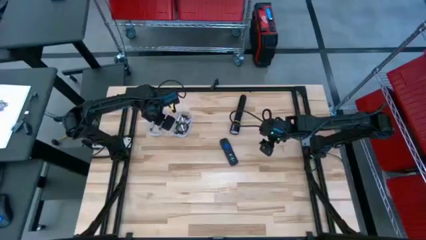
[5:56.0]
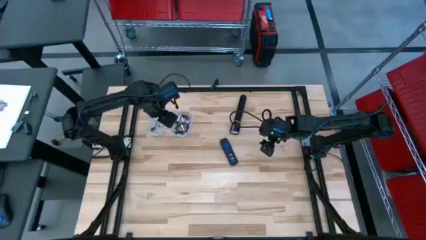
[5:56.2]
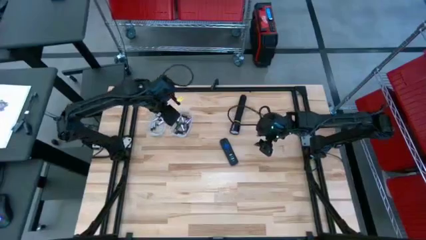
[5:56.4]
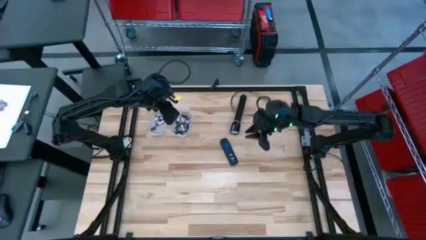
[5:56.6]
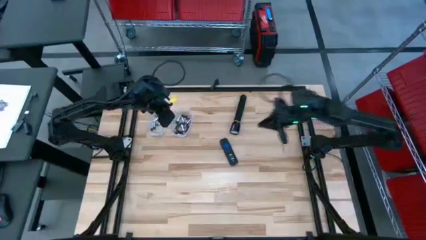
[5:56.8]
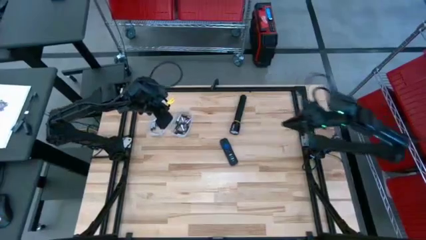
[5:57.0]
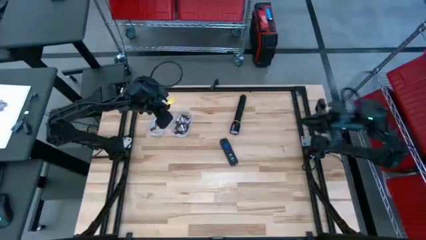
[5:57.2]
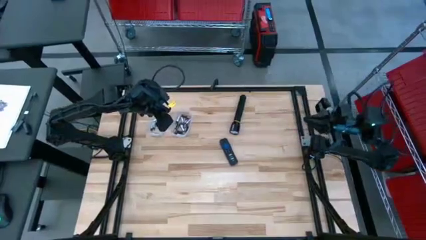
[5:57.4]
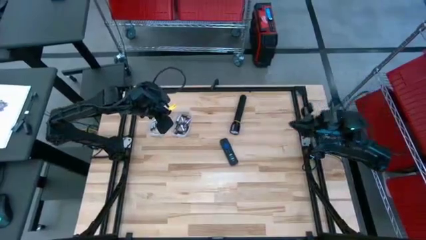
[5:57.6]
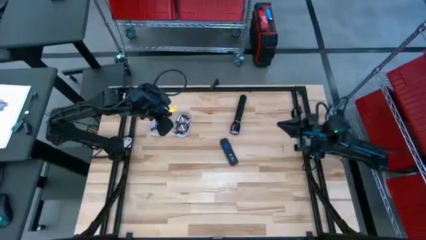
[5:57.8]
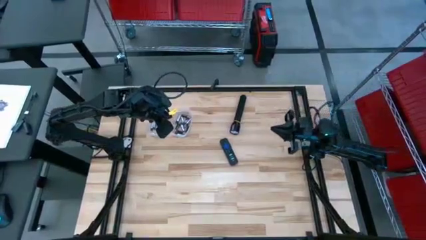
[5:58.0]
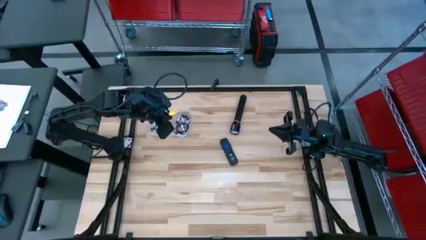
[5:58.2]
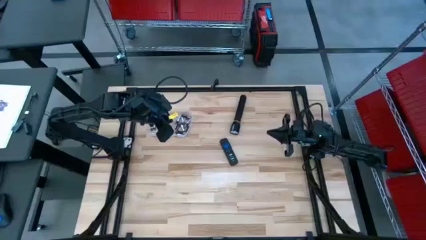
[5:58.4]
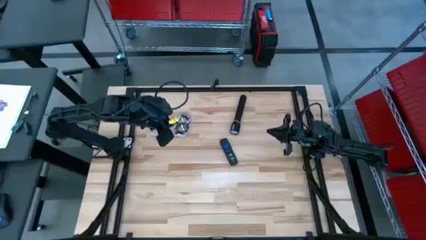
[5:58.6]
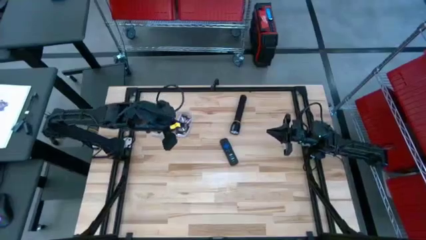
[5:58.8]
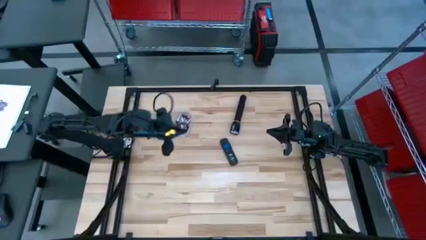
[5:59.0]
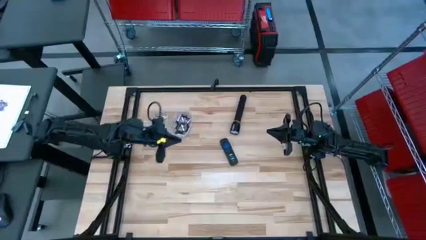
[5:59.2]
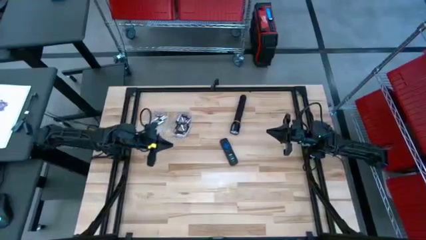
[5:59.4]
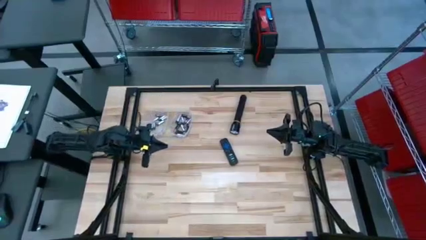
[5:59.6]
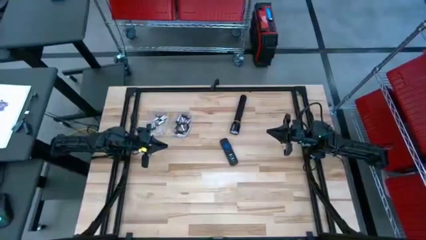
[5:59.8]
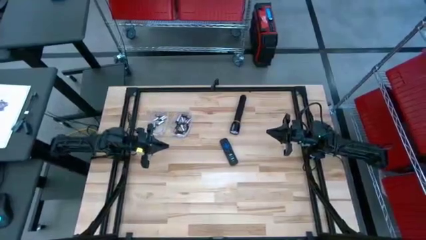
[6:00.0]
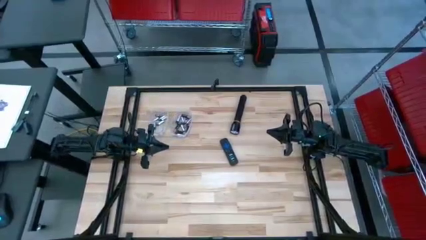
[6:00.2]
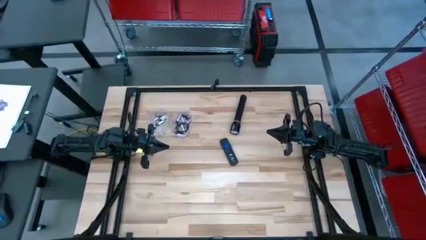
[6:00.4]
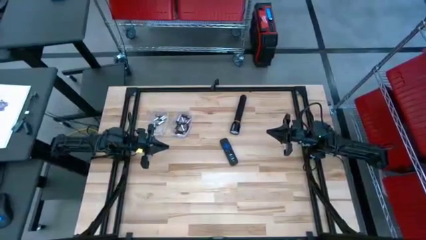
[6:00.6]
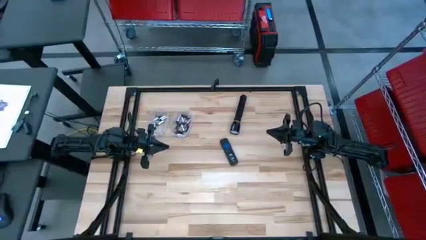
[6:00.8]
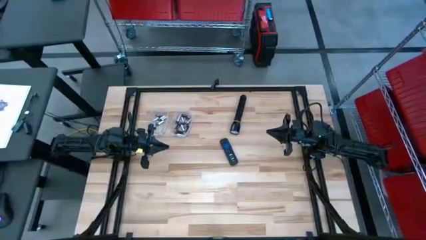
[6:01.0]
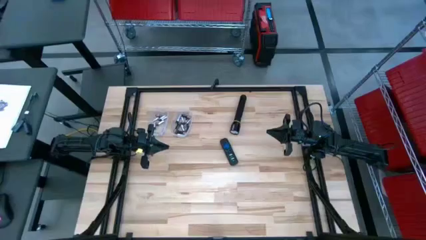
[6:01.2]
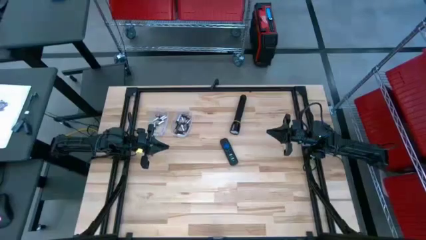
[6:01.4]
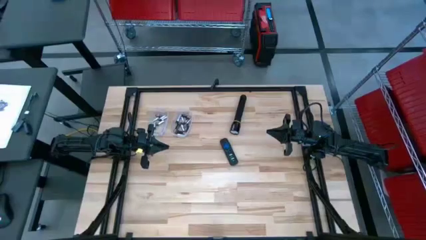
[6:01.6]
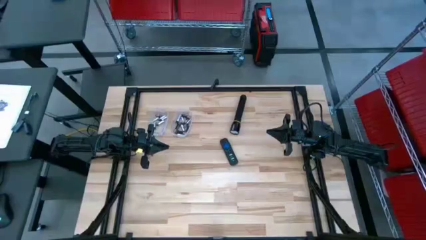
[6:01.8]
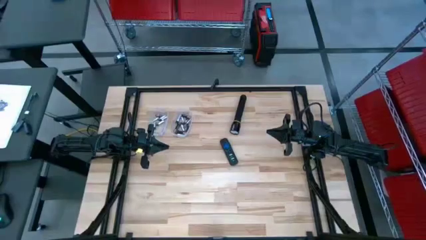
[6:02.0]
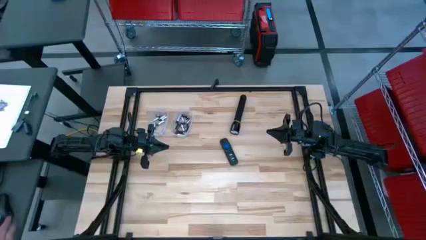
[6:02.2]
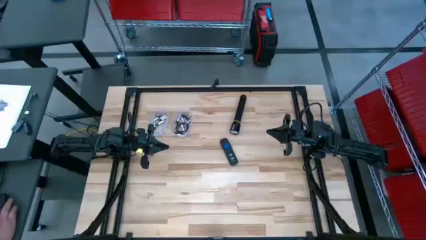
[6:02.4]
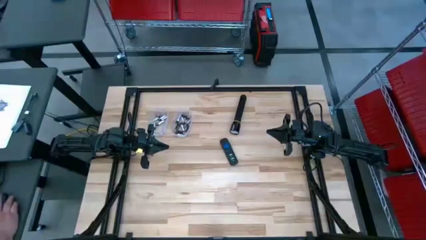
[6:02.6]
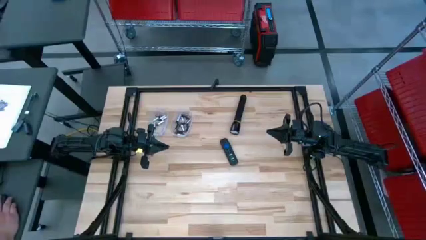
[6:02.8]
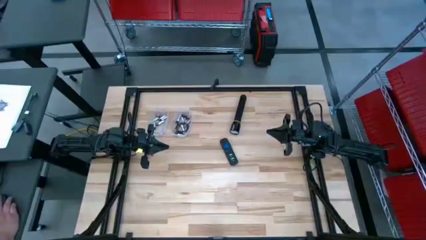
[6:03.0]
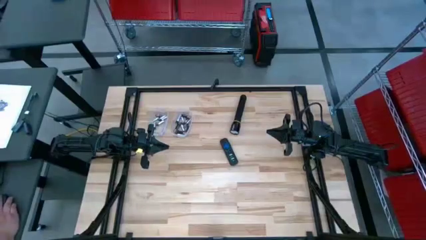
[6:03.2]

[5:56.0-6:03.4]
Task: Insert battery
Return to Home Position

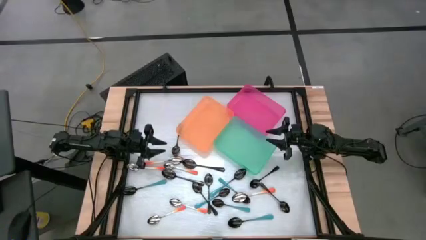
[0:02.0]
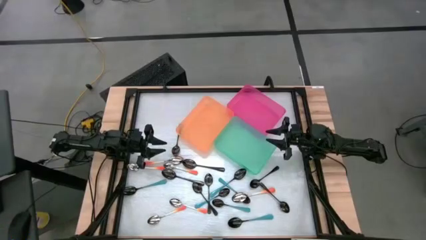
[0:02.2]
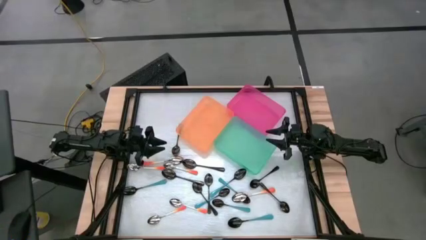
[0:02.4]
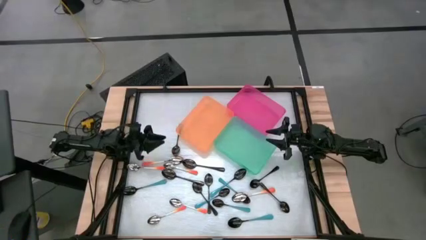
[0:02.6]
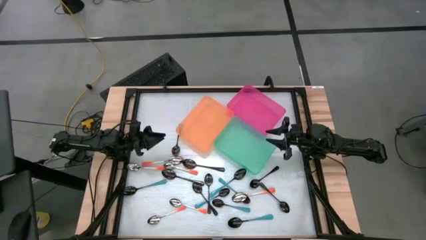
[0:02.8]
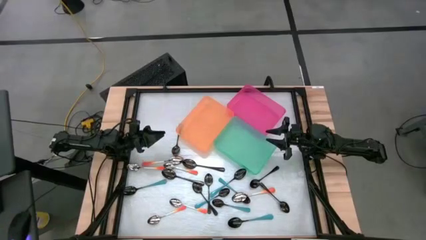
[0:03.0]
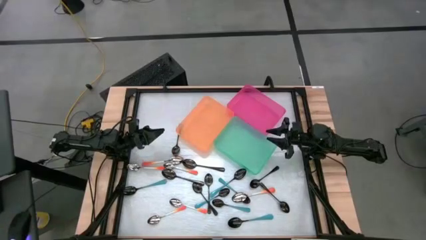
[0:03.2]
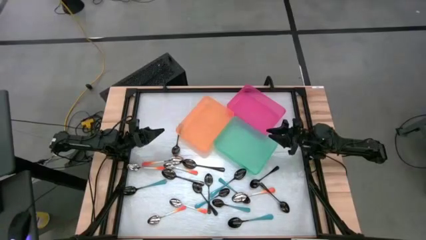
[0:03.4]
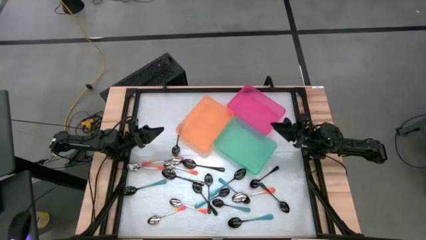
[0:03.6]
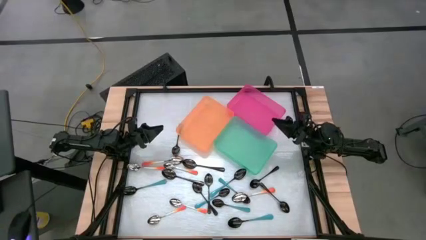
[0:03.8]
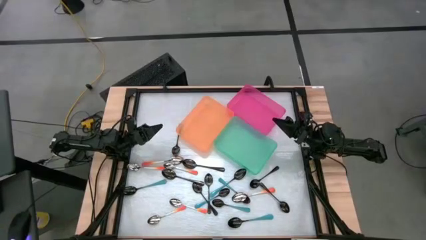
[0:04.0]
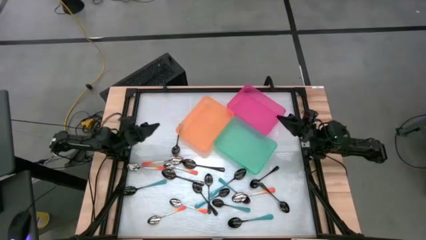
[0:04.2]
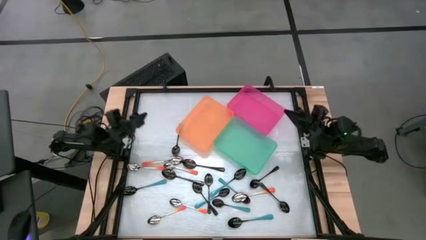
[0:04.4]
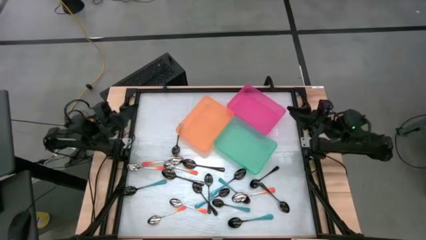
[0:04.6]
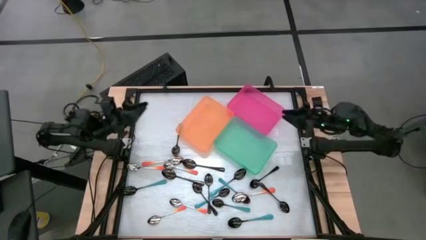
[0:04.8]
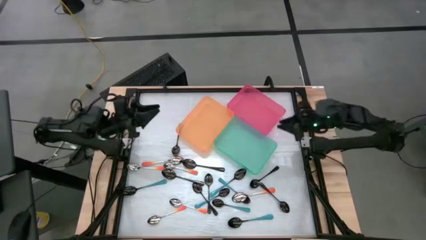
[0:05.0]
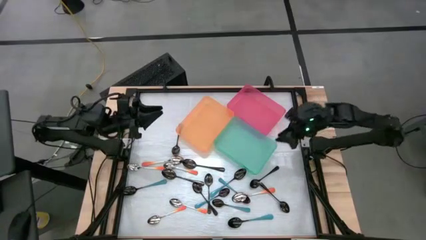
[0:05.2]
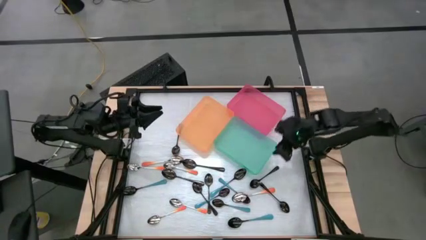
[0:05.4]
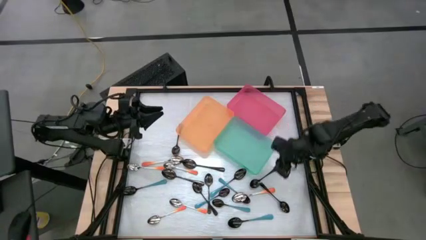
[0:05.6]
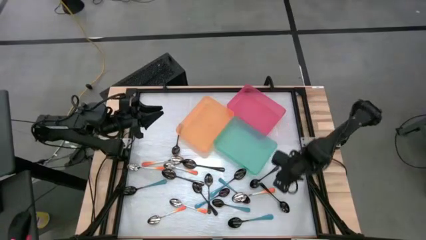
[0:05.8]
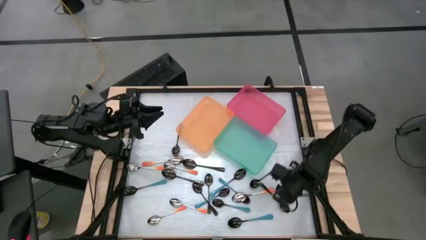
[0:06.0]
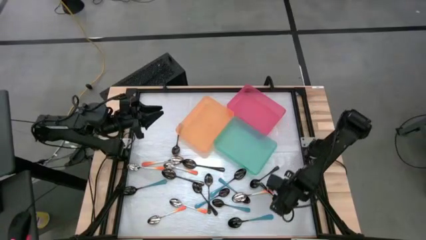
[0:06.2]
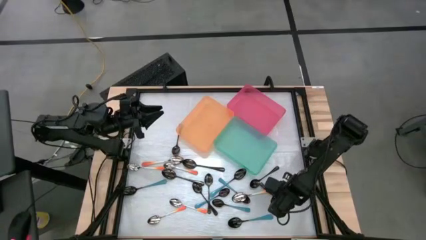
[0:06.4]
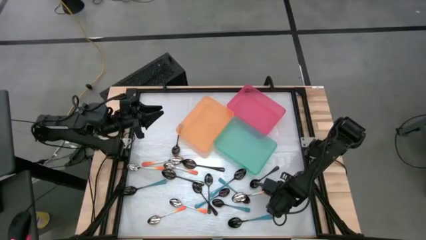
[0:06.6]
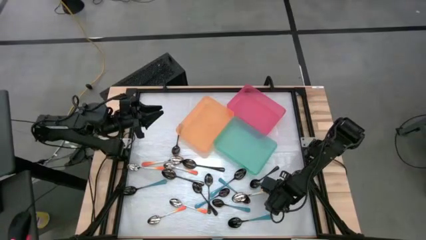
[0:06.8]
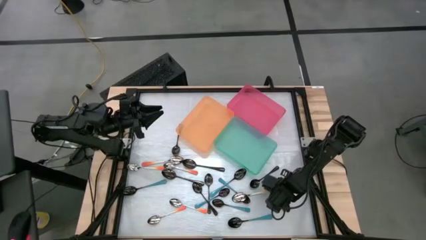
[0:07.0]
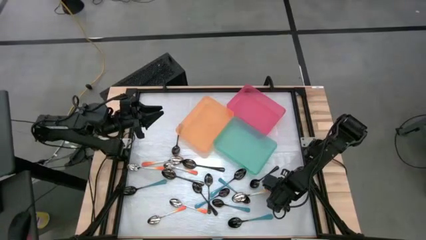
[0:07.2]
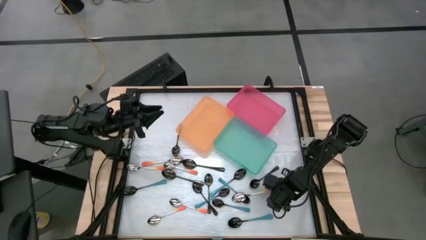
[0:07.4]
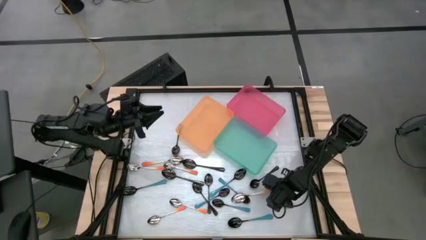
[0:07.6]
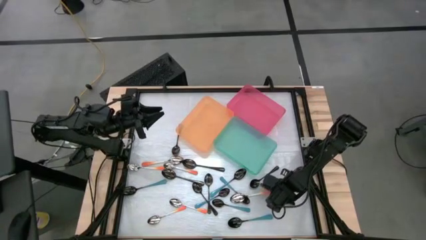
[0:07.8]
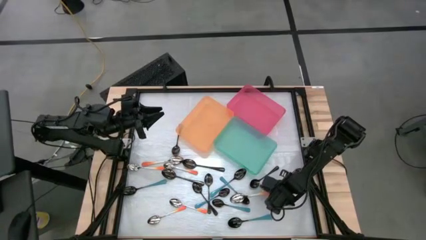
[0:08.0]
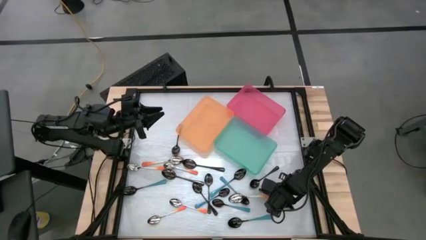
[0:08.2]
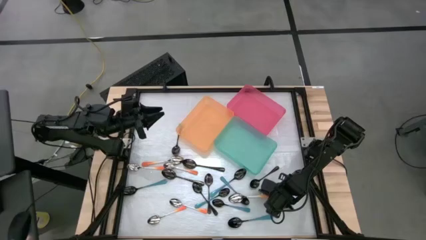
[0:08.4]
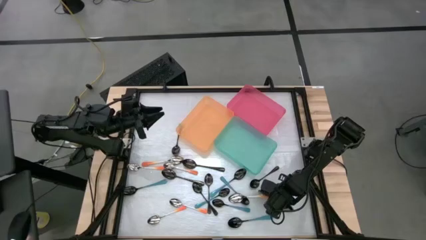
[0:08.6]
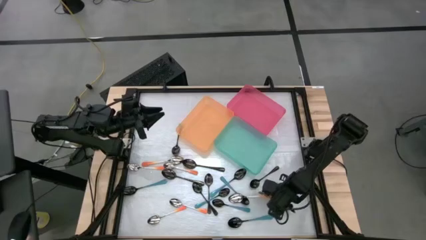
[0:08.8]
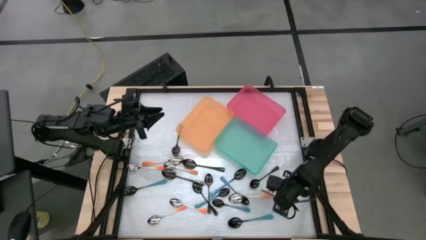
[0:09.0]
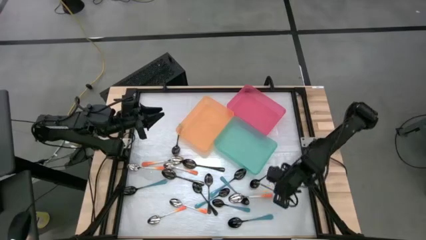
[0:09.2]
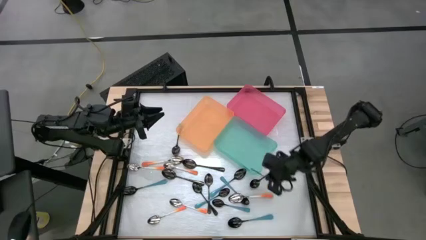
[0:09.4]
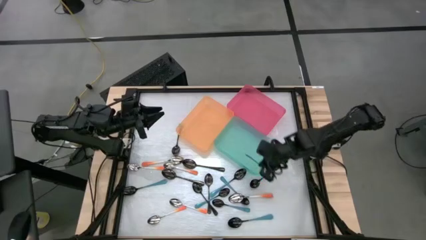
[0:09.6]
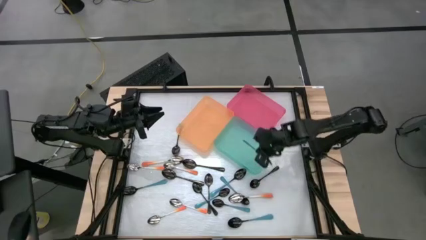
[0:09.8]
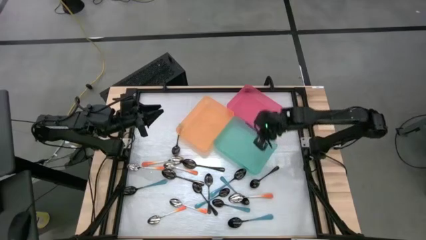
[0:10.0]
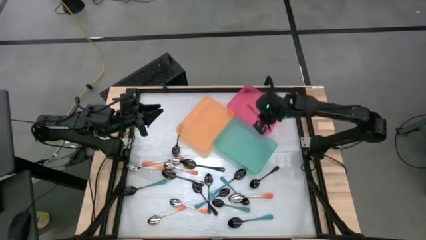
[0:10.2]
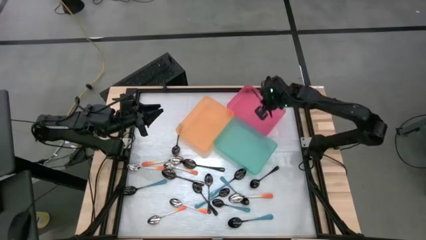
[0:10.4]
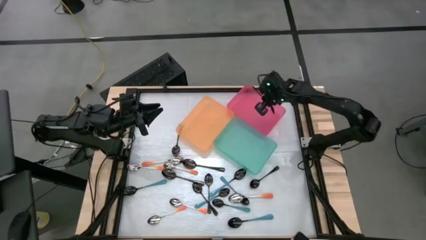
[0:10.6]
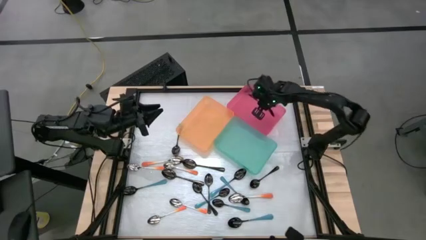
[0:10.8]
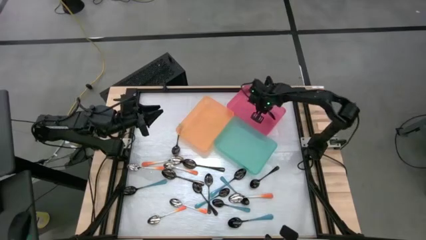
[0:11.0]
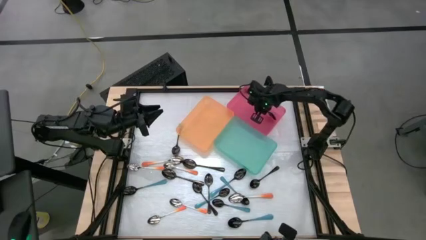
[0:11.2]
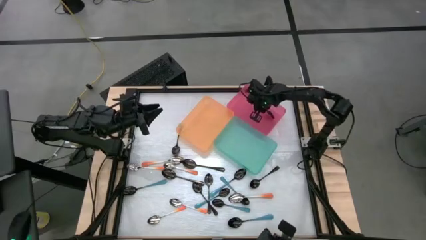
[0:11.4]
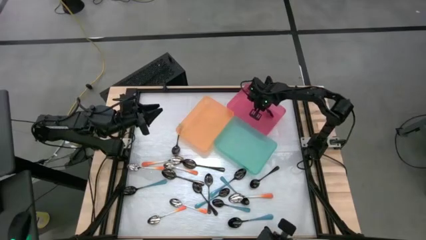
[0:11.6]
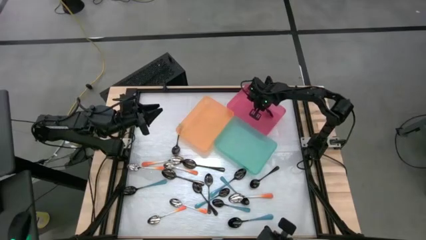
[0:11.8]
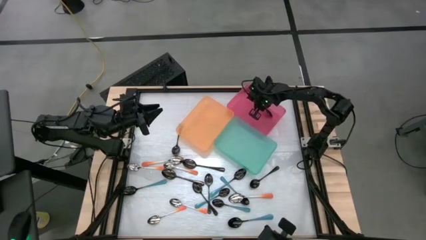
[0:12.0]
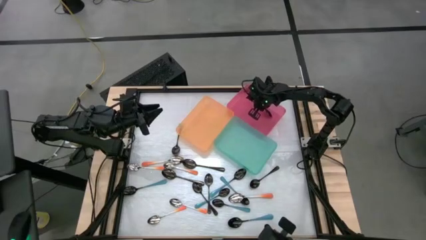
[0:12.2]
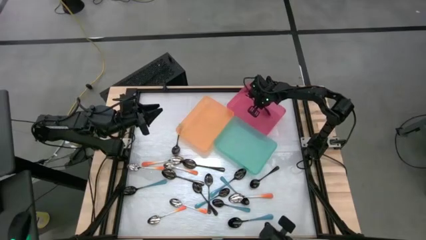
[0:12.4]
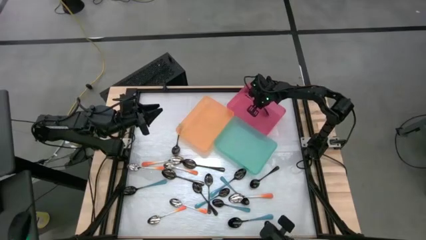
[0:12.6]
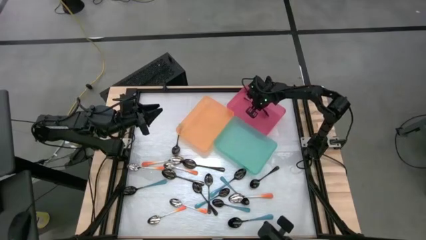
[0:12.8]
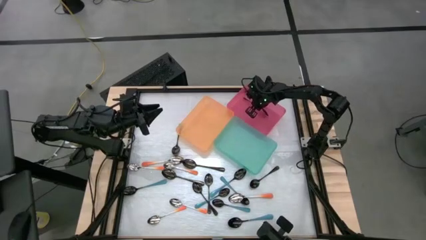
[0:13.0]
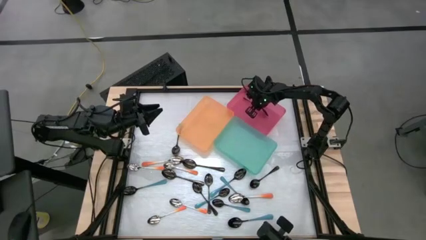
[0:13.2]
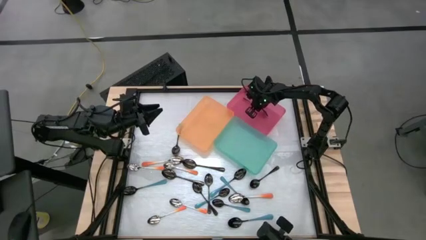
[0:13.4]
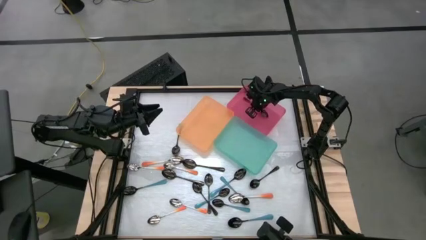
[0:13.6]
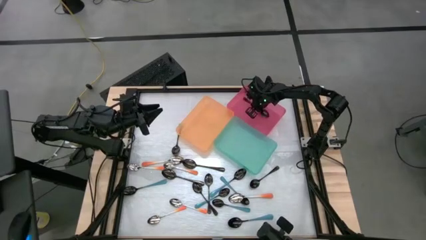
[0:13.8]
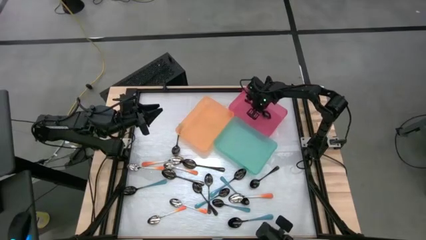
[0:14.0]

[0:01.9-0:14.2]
Task: Sort silverware by color (type)
Put the black spoon into the pink bin
